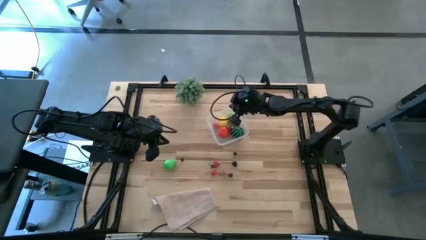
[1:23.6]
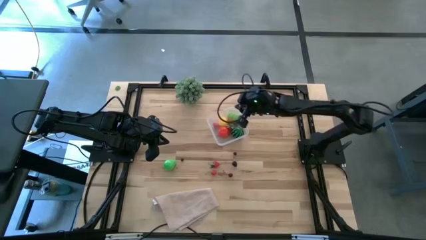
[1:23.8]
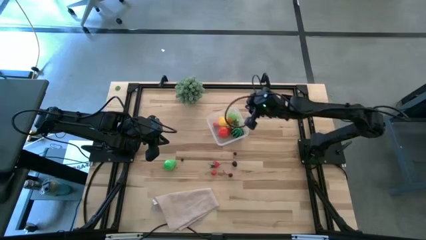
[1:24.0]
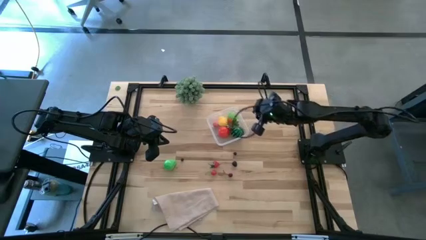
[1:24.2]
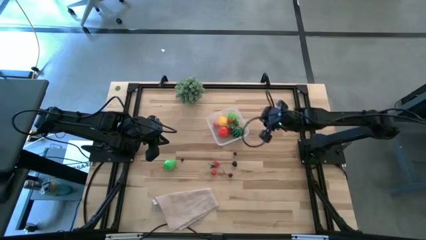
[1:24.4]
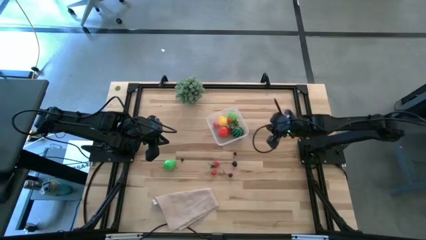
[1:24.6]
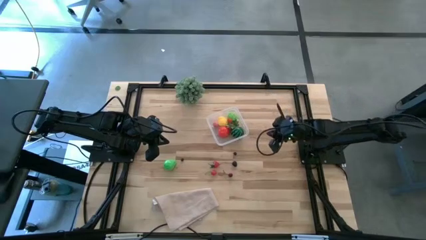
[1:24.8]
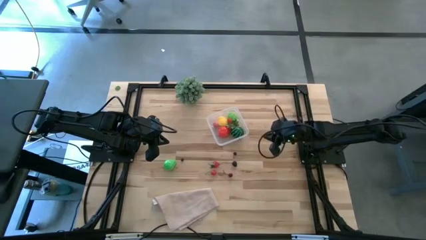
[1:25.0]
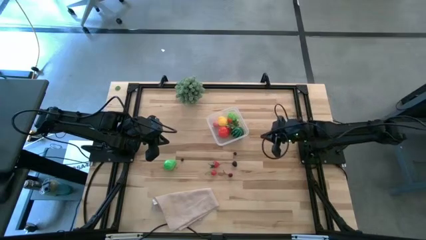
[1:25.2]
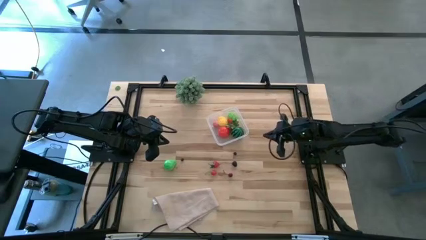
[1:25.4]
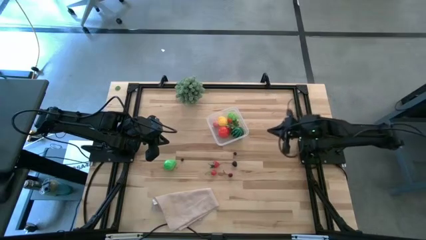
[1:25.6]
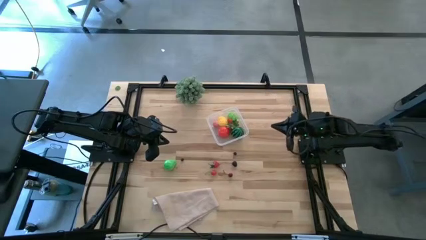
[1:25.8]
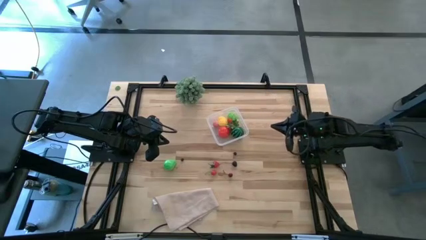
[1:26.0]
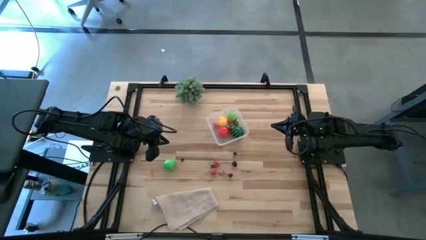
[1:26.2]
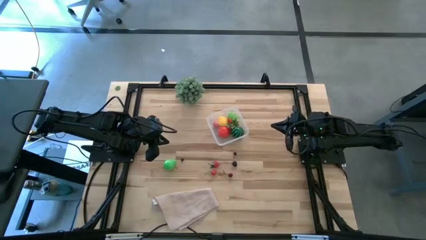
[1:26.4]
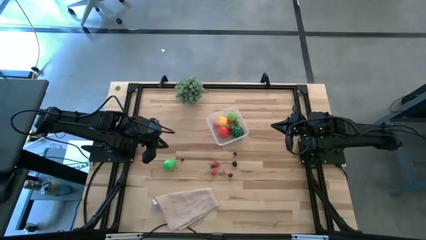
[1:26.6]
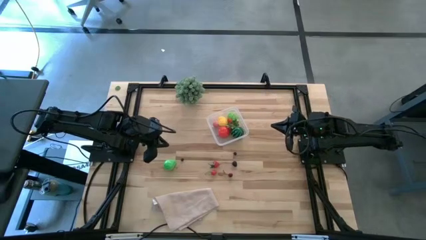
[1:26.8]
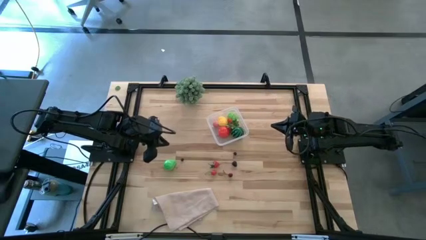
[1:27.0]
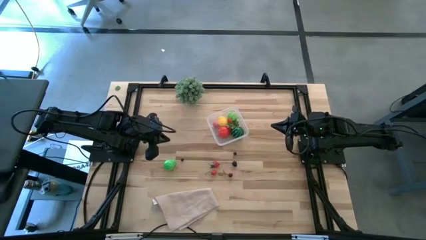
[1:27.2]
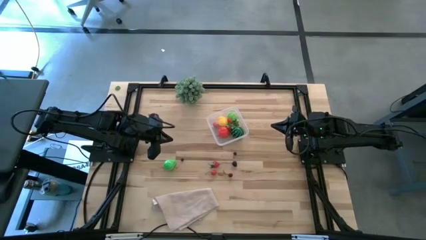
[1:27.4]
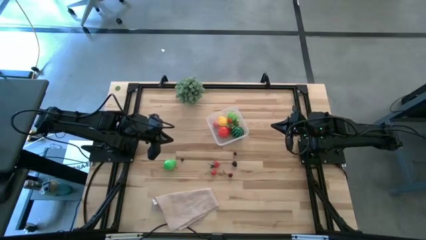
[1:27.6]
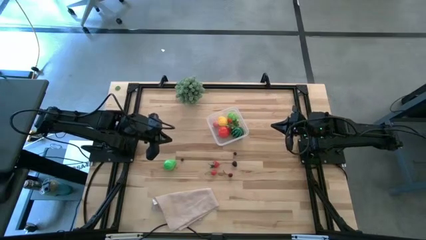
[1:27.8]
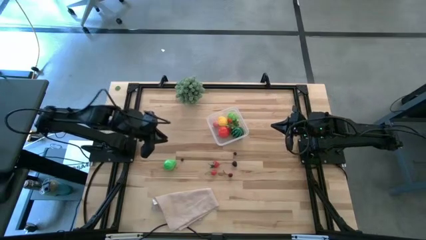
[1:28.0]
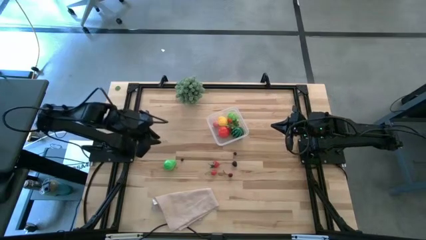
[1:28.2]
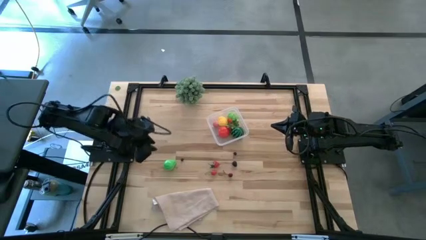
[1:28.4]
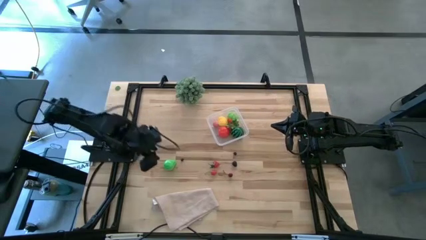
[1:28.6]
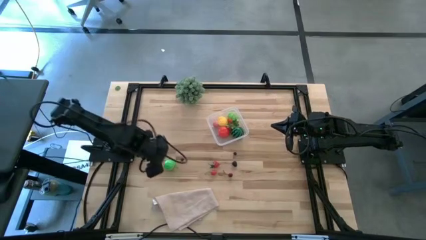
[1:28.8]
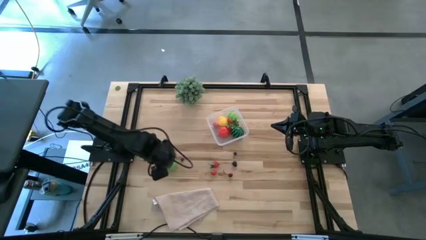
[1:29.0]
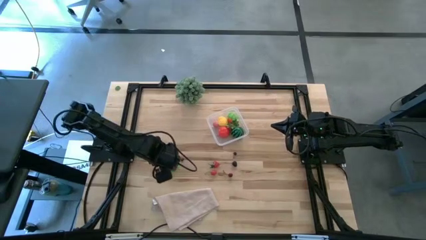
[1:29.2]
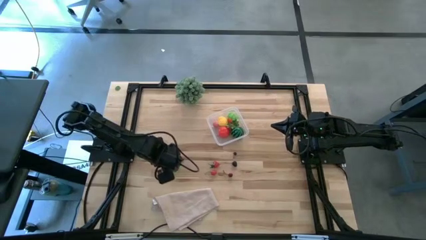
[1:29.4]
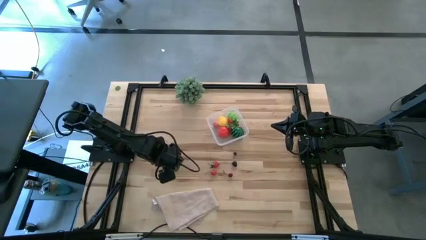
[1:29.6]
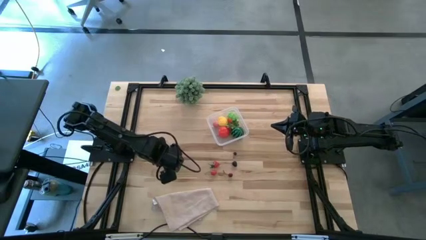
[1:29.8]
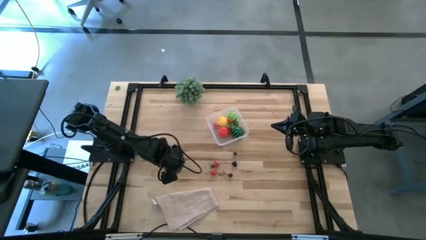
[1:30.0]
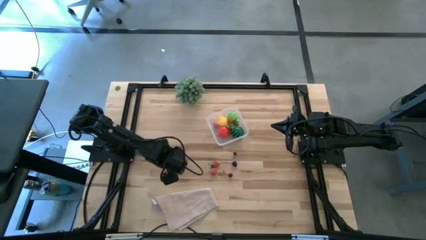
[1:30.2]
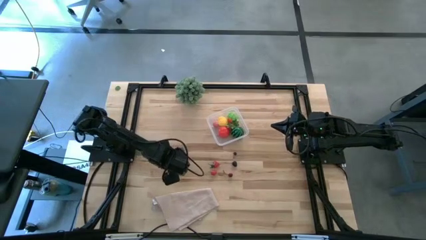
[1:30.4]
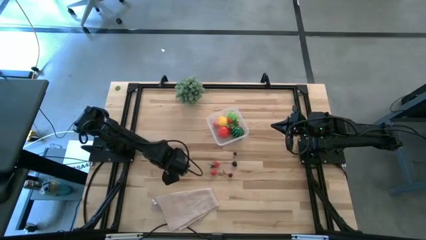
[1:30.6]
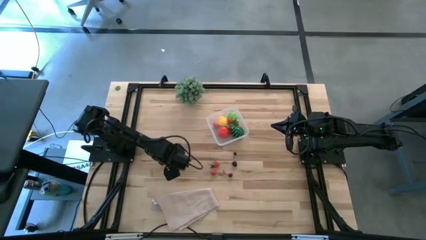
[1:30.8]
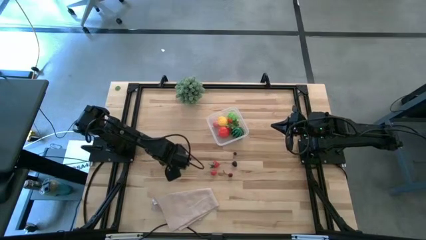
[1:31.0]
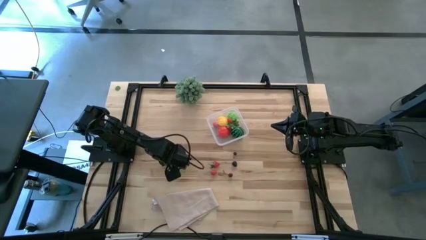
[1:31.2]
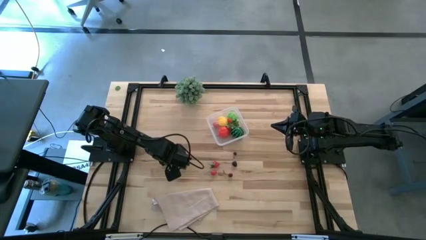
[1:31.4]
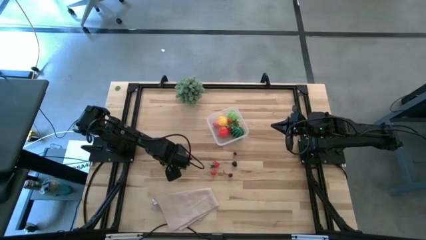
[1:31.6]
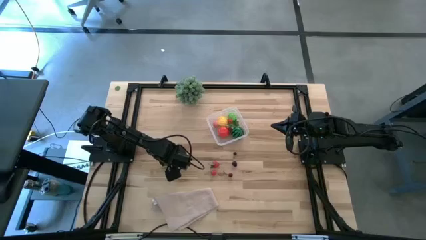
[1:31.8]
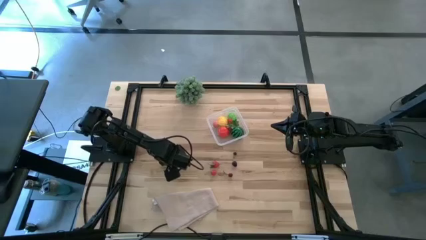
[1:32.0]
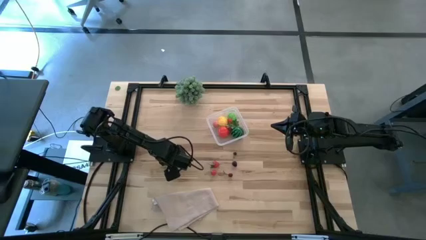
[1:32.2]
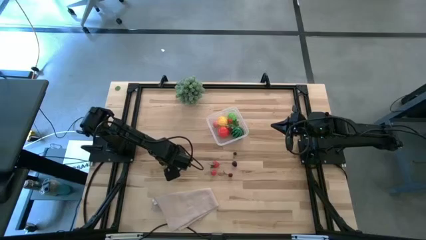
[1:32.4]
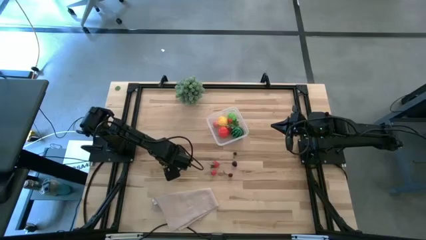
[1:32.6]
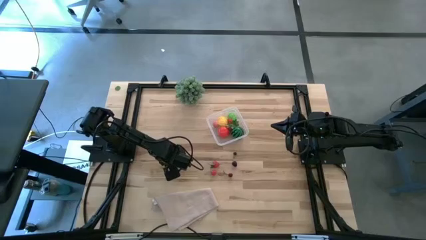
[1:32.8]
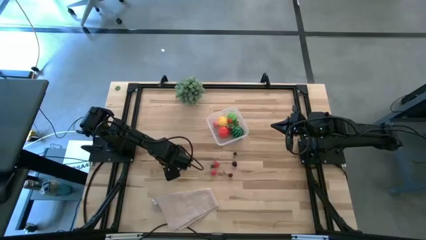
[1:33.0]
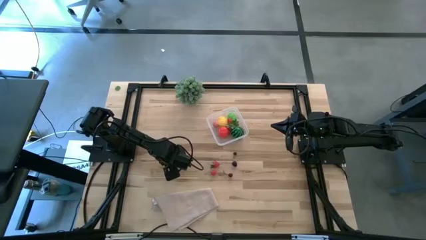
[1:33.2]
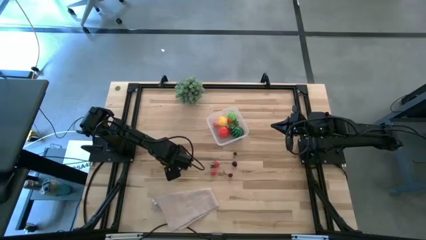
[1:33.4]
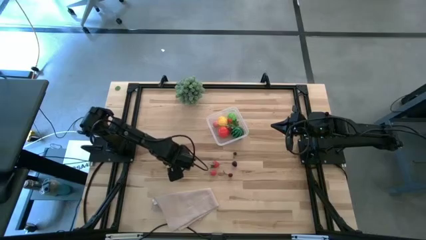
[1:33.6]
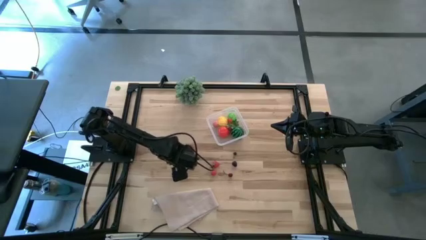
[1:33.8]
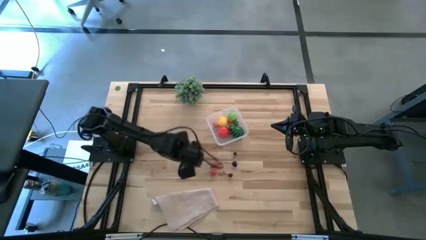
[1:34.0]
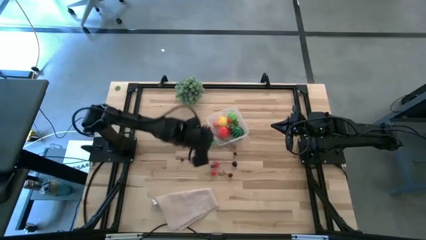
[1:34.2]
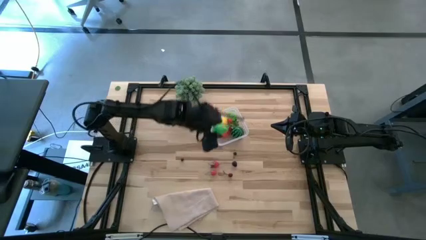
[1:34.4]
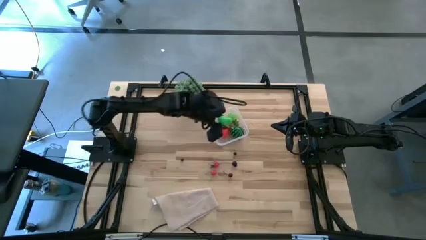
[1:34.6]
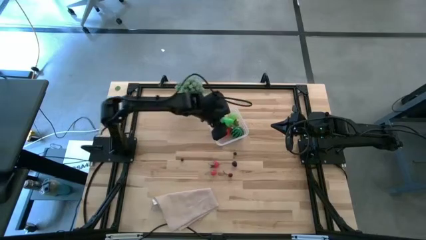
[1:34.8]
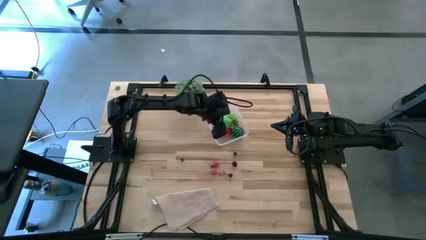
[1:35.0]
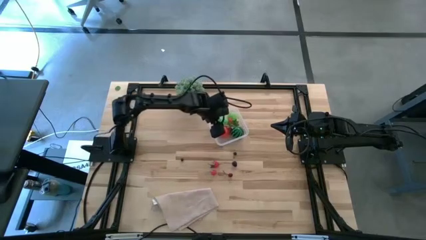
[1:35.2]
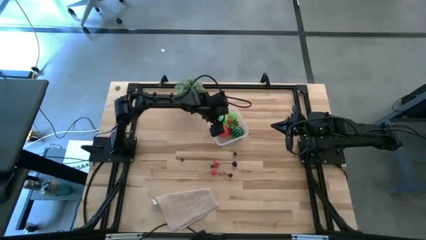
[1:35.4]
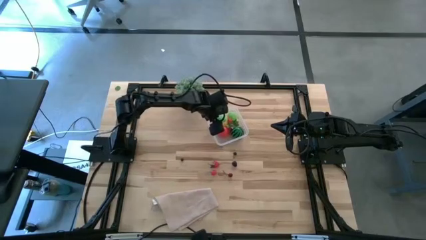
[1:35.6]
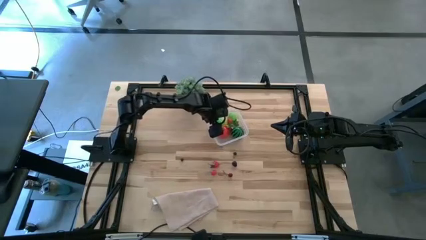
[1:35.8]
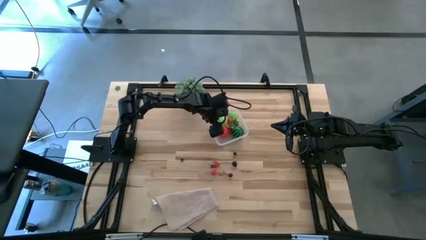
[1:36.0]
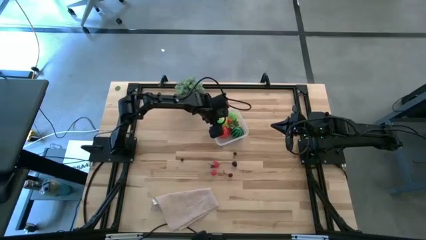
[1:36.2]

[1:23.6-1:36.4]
Task: Pick and placing Produce into tupperware
Put the green pear into the transparent bin
